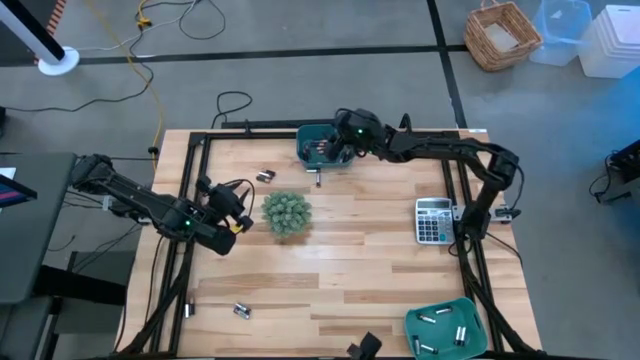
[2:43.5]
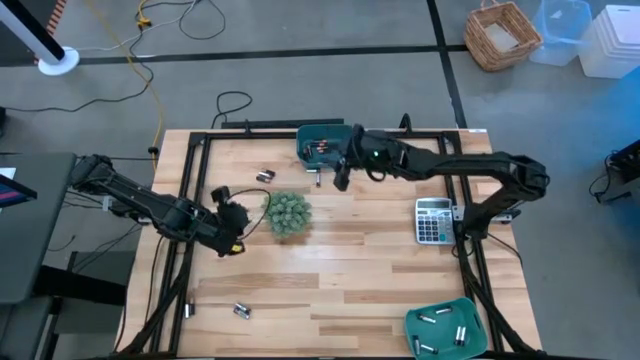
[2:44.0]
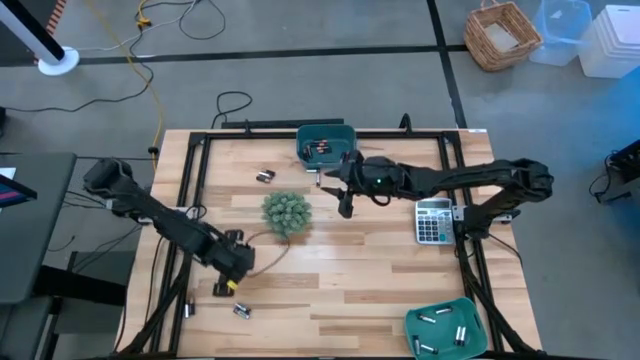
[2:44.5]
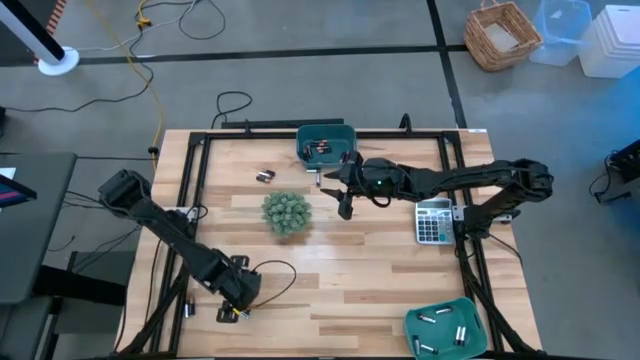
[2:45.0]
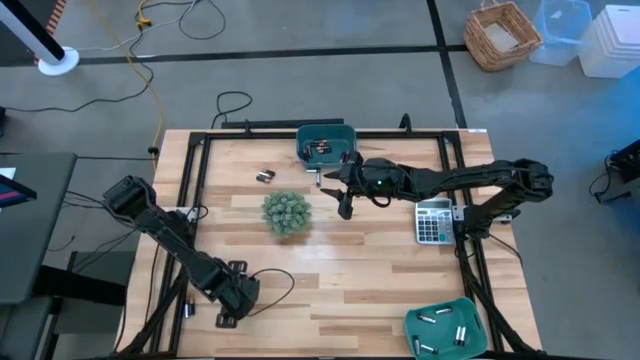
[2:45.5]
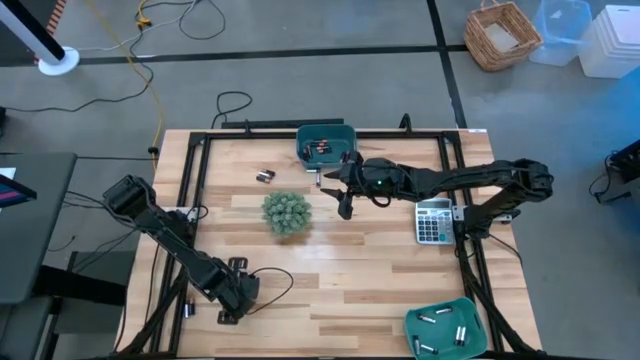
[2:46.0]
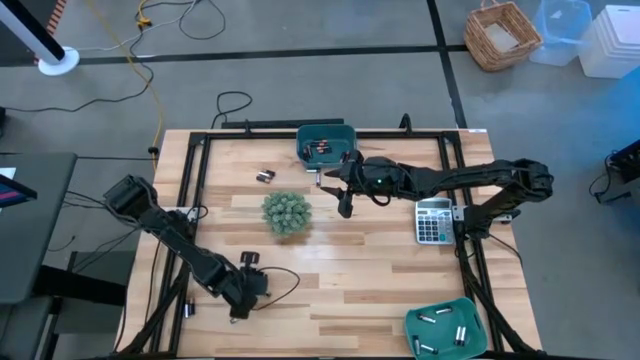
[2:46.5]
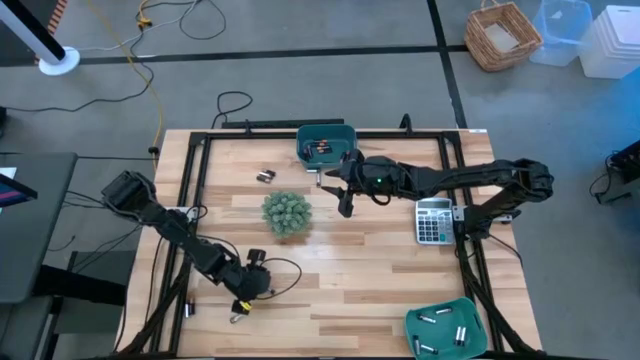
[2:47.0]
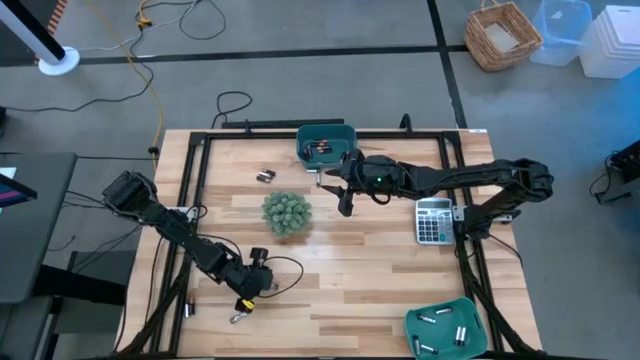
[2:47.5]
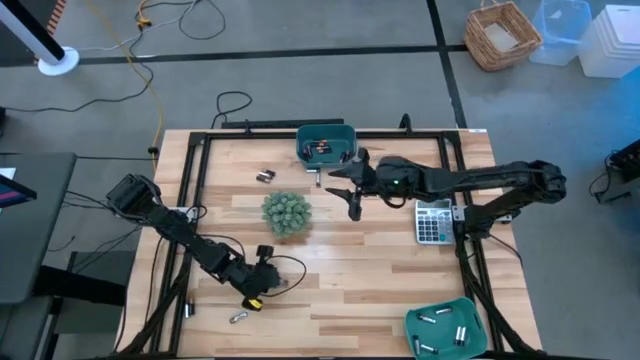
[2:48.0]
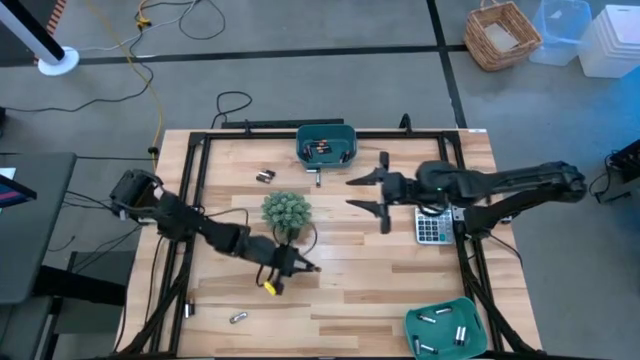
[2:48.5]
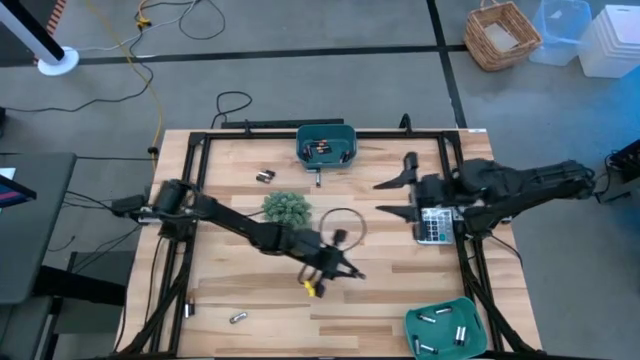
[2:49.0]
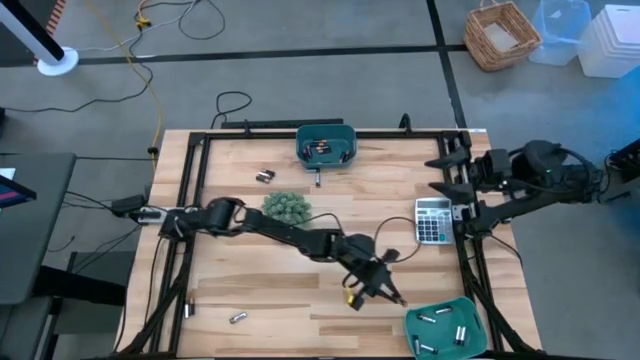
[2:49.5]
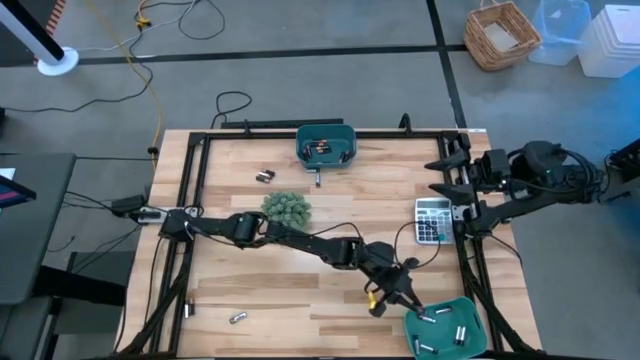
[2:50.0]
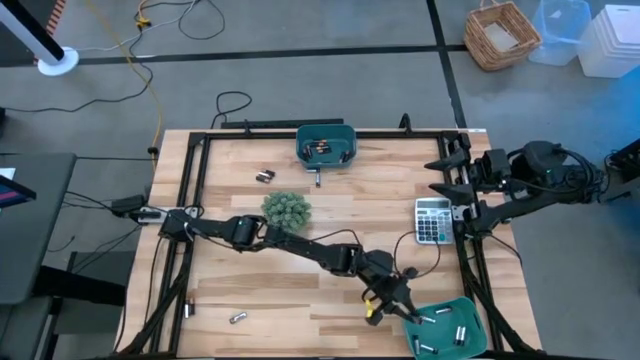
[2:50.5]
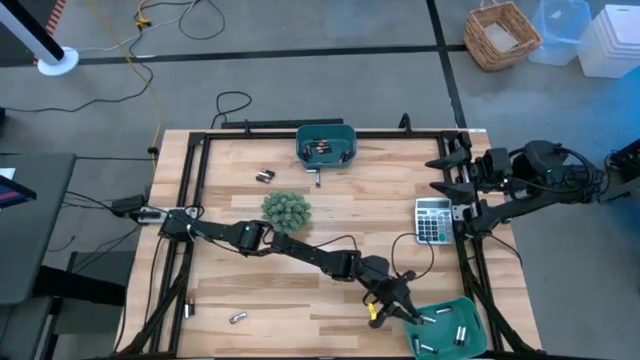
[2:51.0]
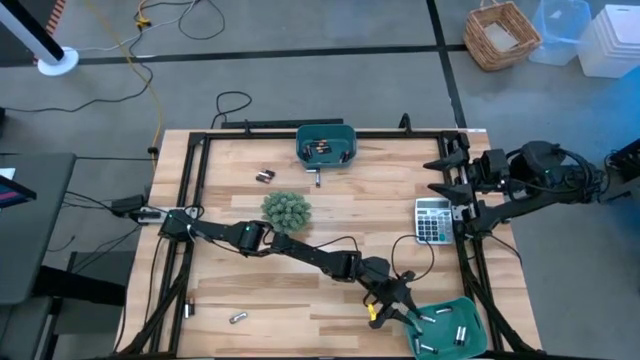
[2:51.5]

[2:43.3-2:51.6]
Task: Sort batteries
Put the silver battery into the green bin

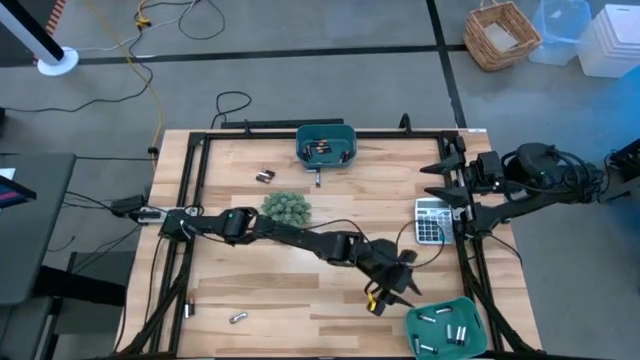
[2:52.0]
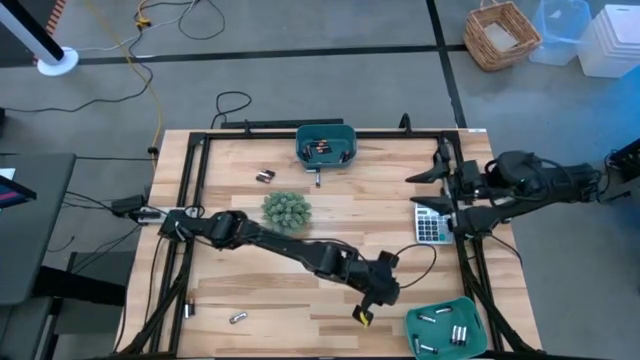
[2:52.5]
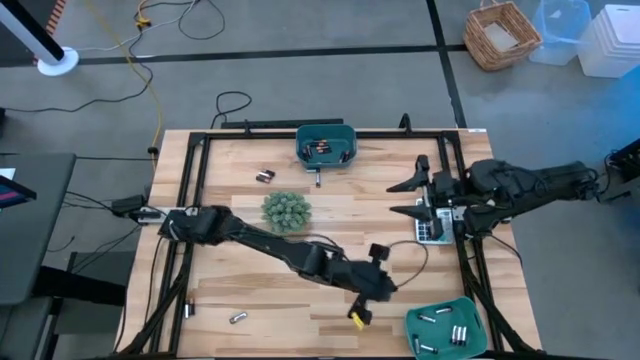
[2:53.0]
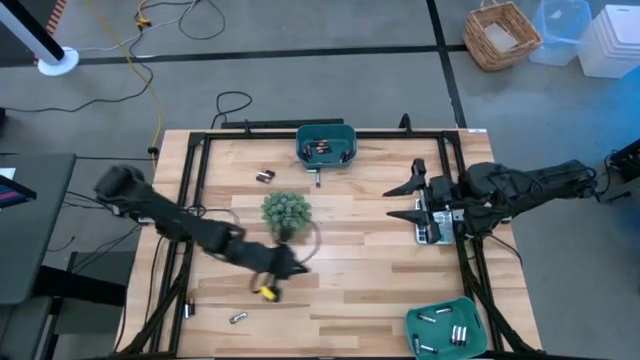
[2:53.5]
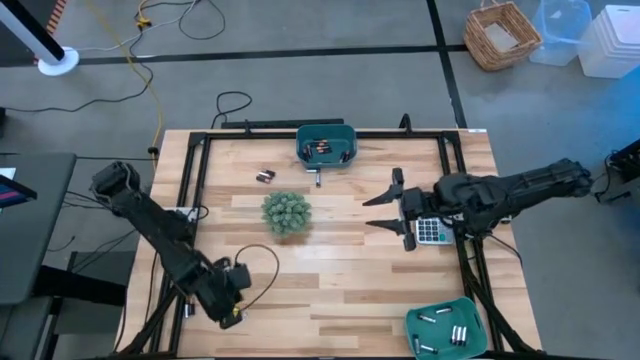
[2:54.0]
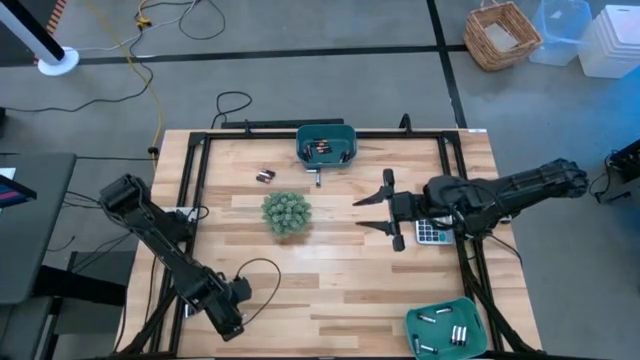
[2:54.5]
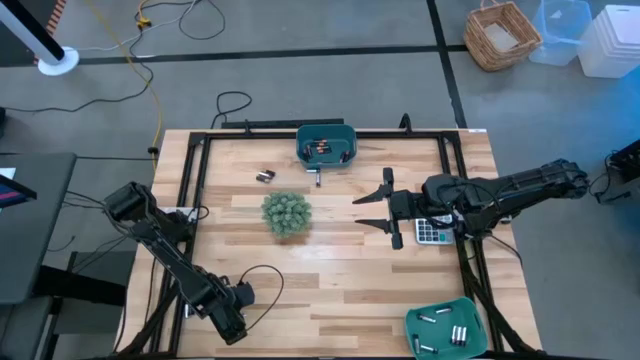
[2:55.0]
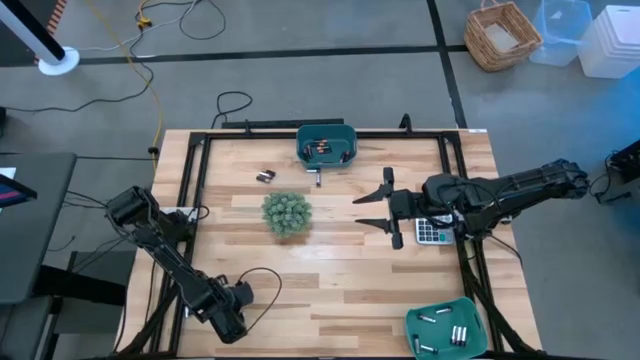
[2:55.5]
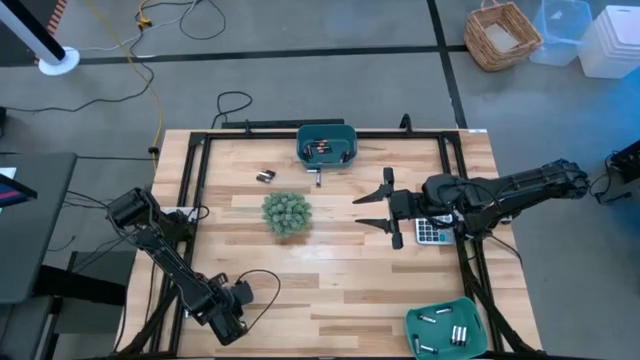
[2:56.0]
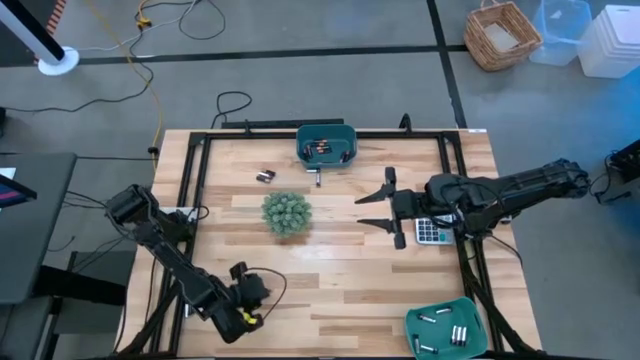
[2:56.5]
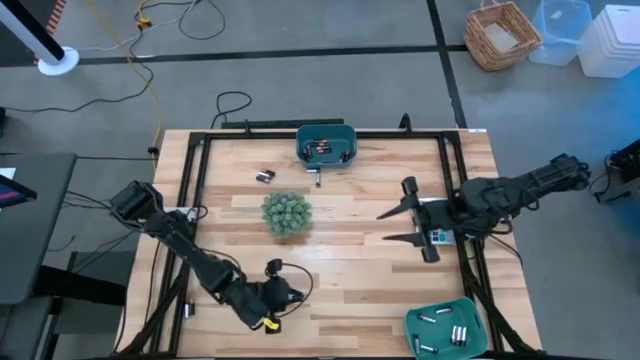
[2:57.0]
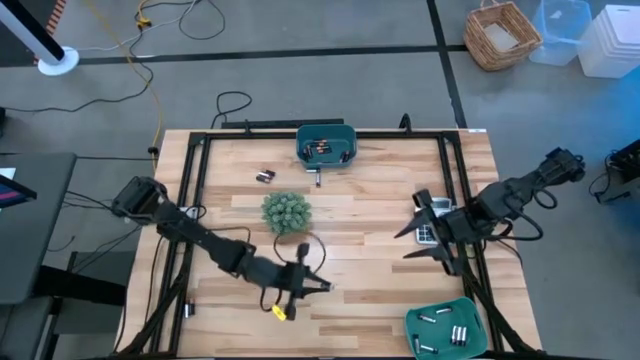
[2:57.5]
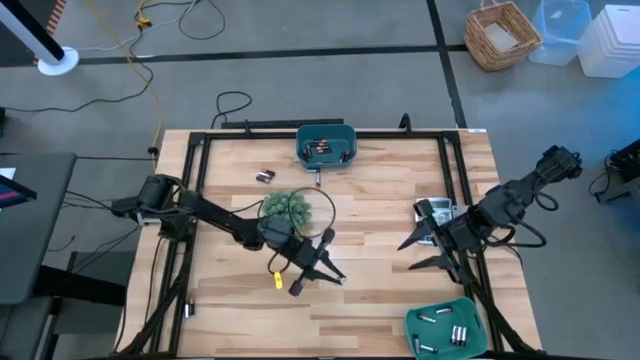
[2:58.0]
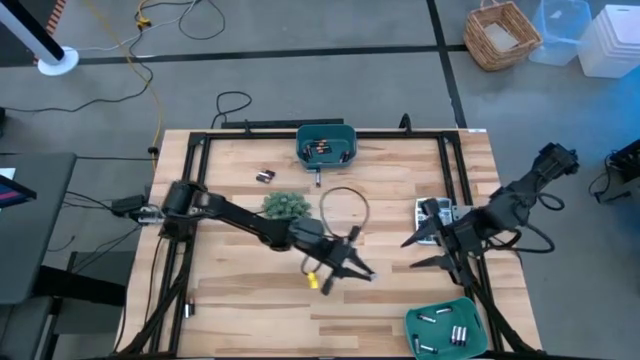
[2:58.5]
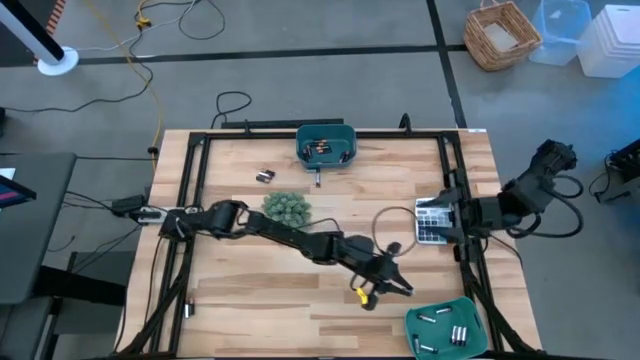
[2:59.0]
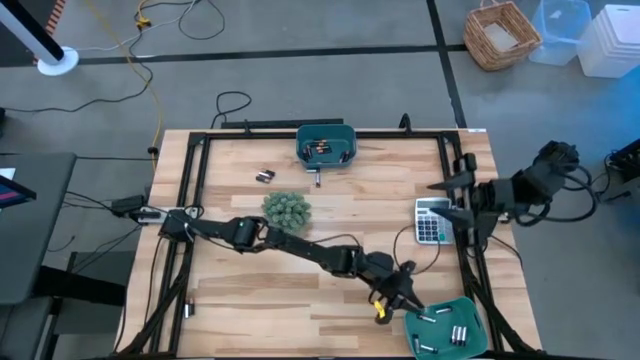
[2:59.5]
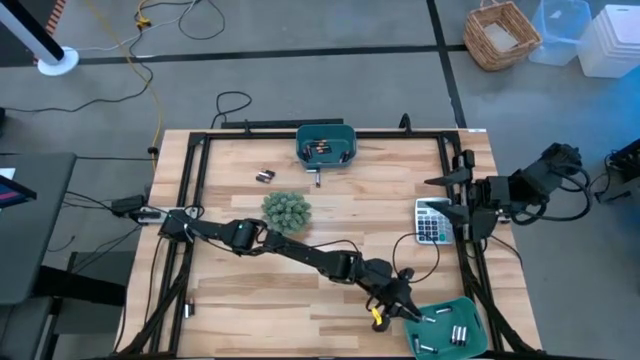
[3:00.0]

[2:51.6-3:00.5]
Put the silver battery into the green bin

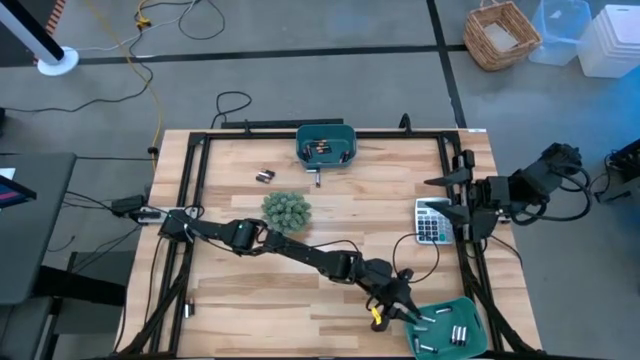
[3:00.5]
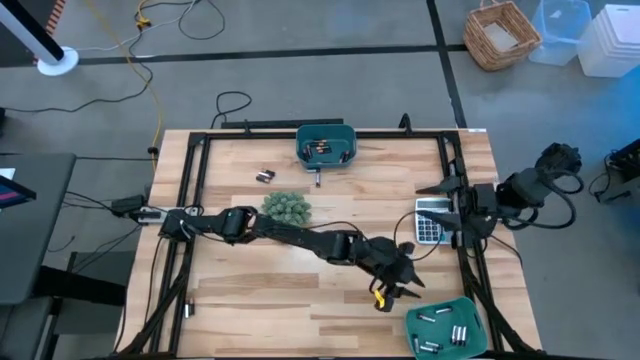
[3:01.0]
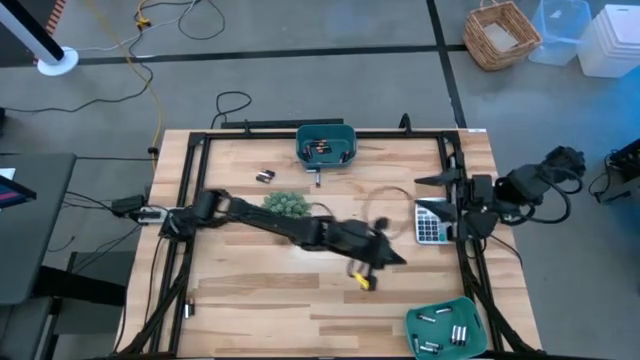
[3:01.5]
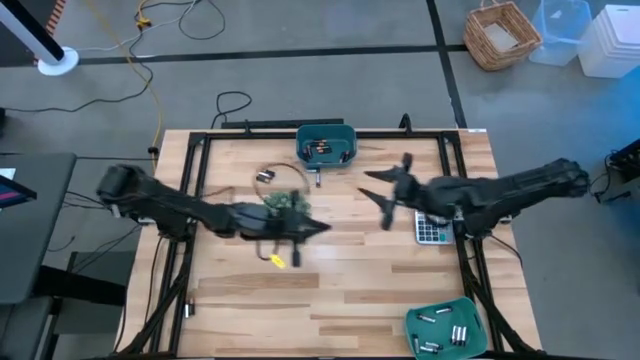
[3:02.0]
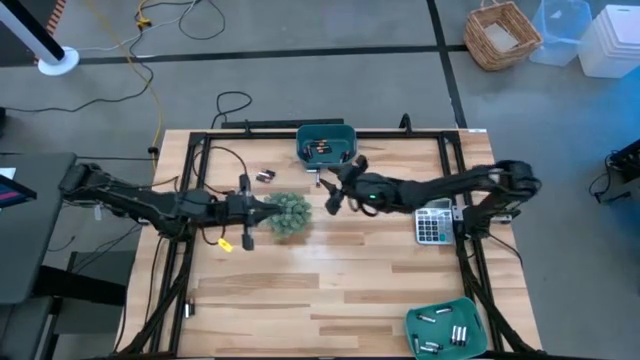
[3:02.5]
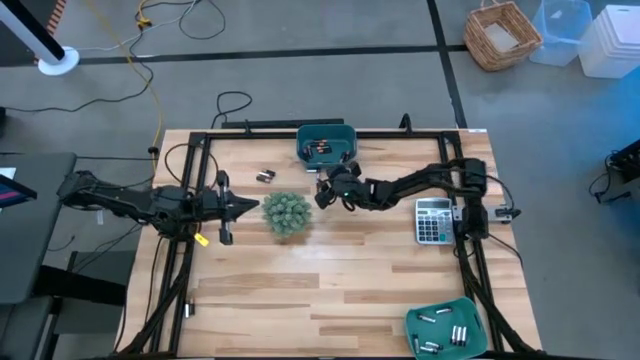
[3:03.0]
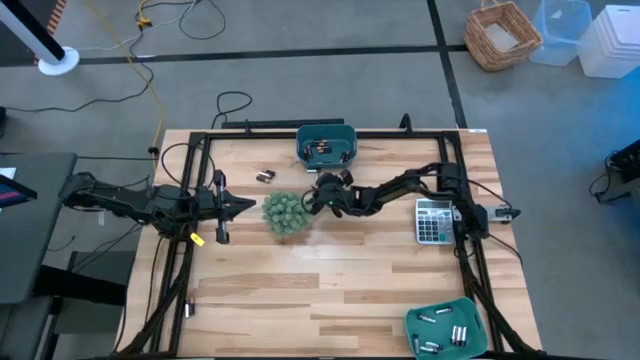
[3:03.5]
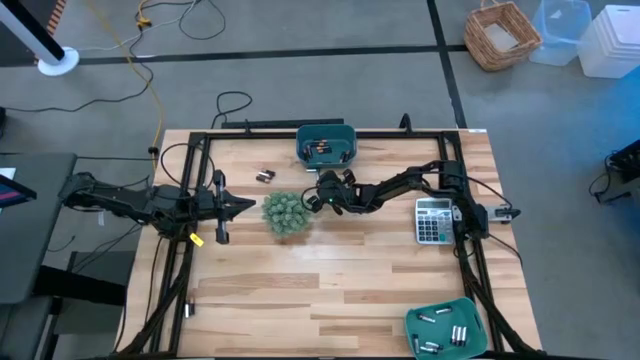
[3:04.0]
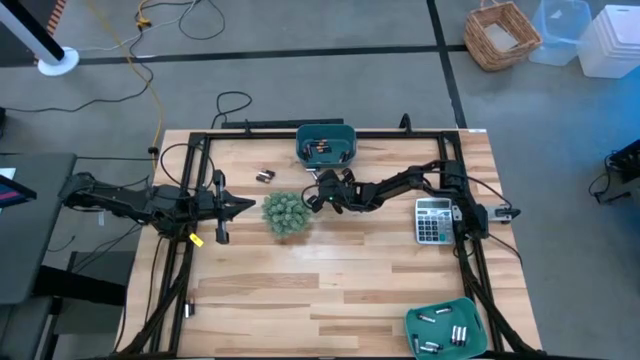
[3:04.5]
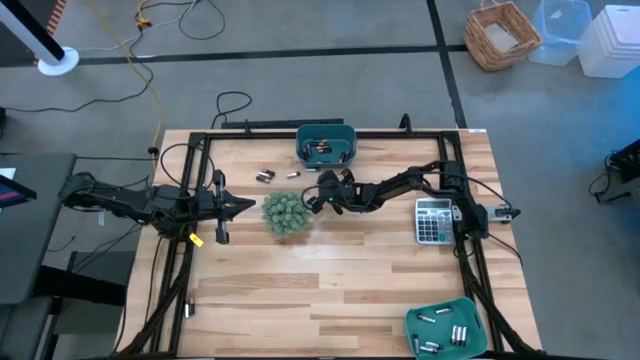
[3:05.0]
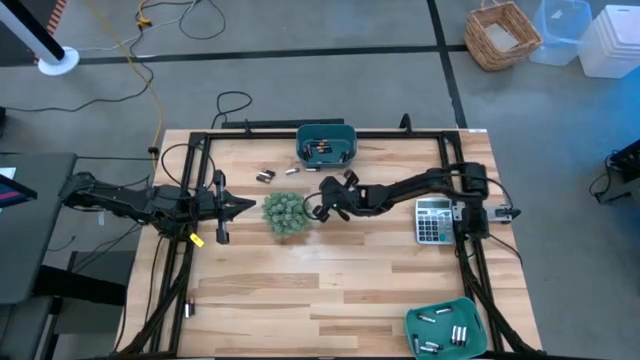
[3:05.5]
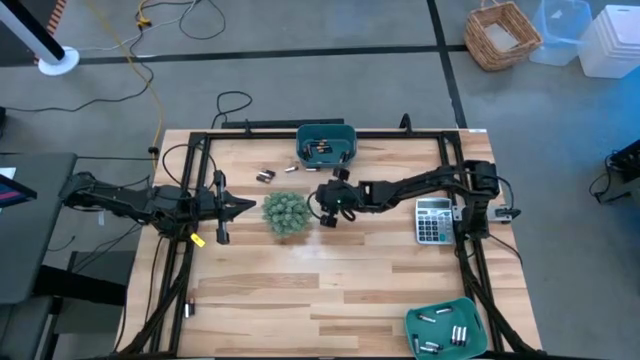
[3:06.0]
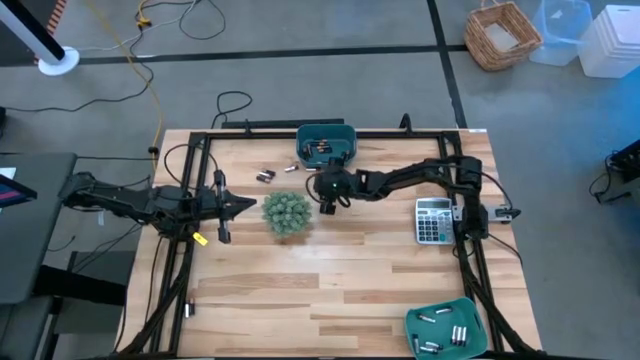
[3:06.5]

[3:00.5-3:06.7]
Put the silver battery into the green bin
